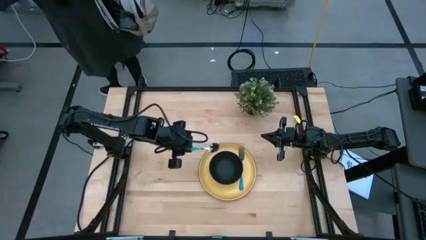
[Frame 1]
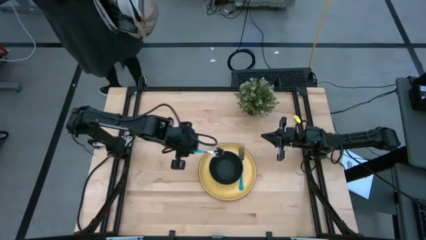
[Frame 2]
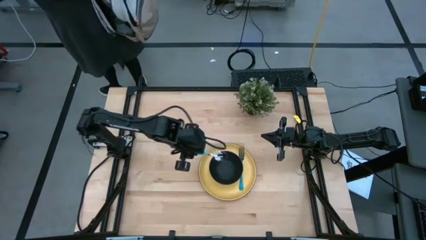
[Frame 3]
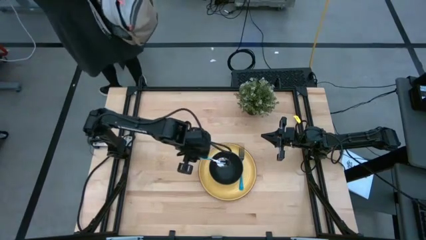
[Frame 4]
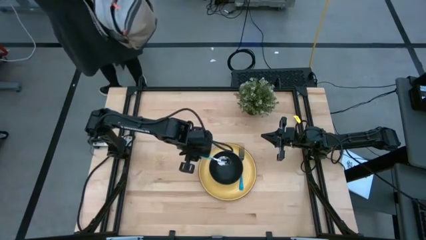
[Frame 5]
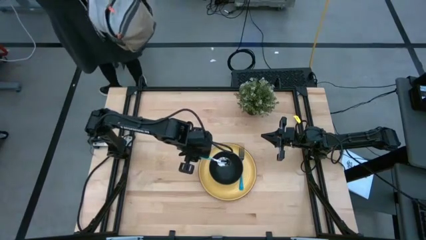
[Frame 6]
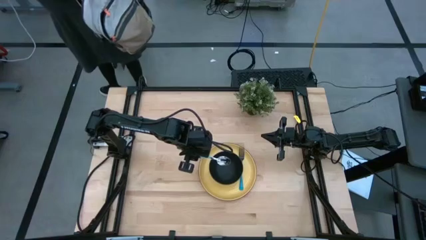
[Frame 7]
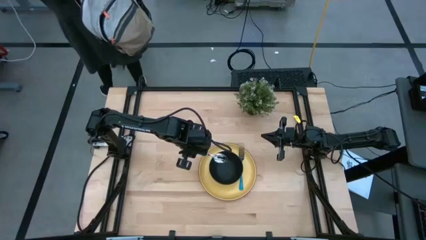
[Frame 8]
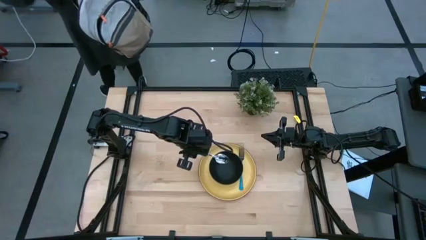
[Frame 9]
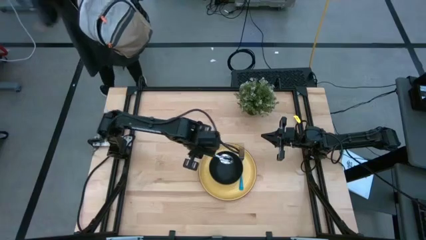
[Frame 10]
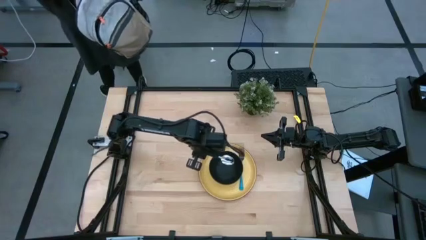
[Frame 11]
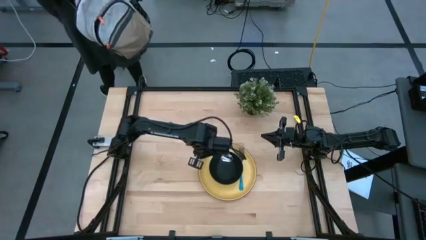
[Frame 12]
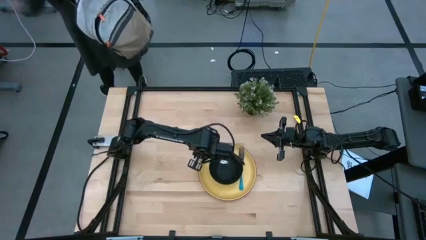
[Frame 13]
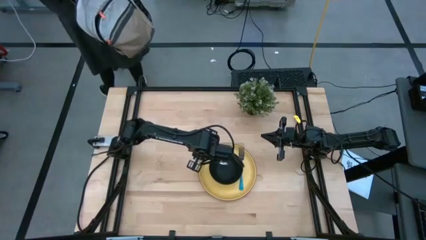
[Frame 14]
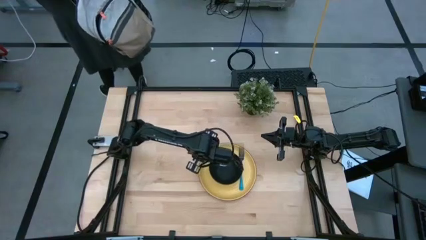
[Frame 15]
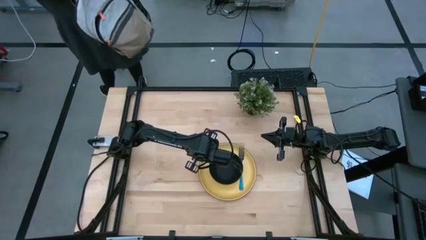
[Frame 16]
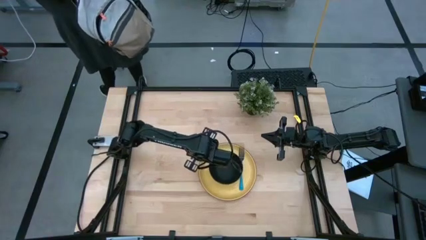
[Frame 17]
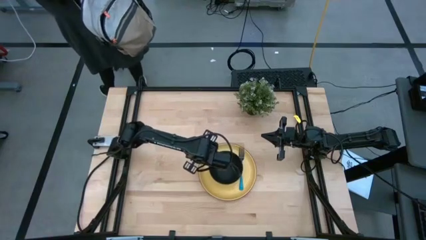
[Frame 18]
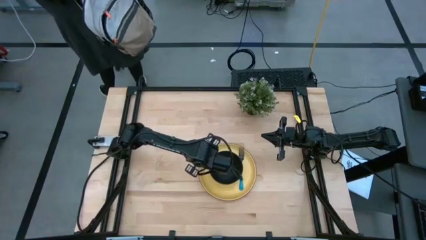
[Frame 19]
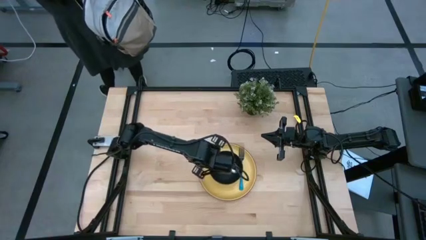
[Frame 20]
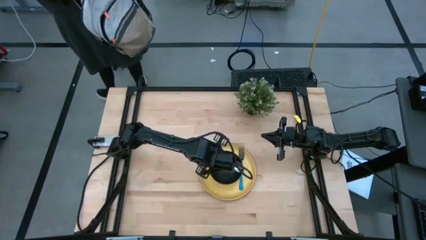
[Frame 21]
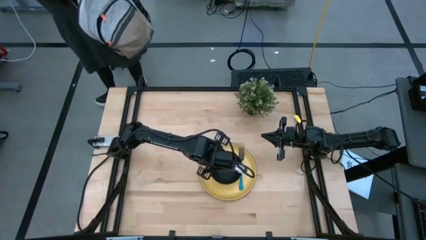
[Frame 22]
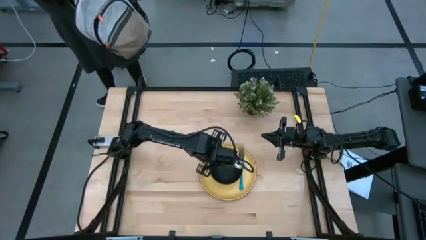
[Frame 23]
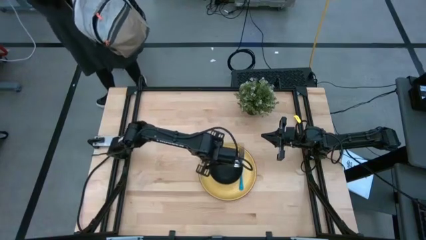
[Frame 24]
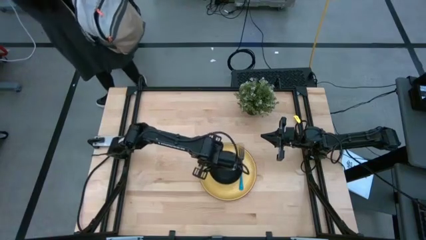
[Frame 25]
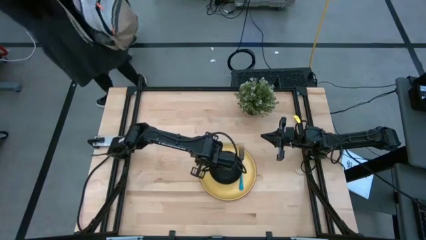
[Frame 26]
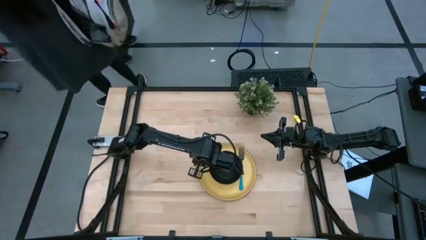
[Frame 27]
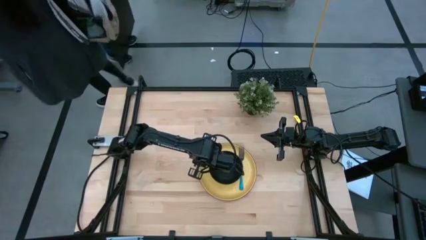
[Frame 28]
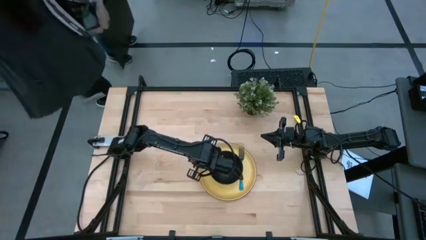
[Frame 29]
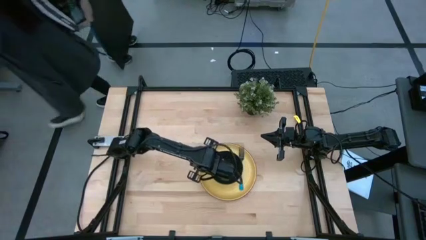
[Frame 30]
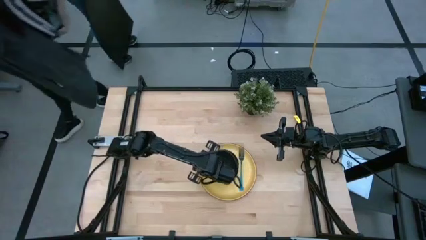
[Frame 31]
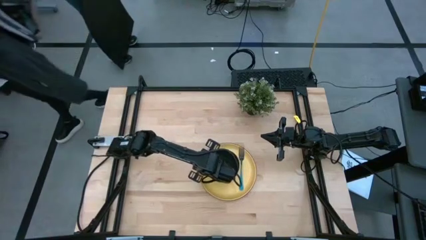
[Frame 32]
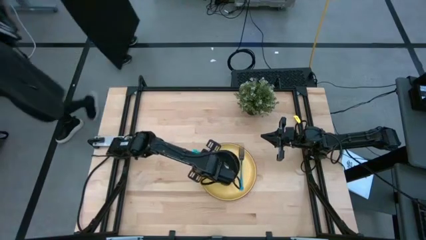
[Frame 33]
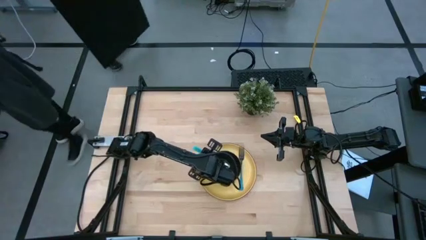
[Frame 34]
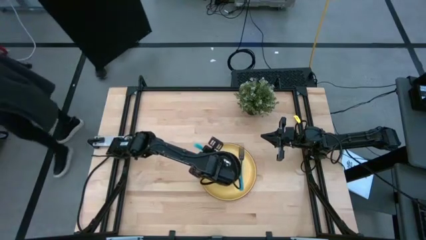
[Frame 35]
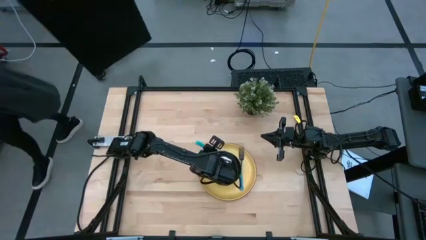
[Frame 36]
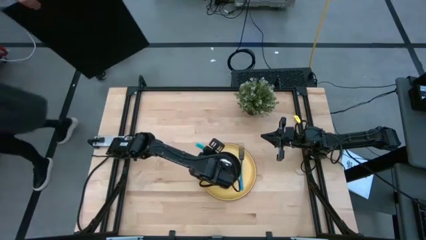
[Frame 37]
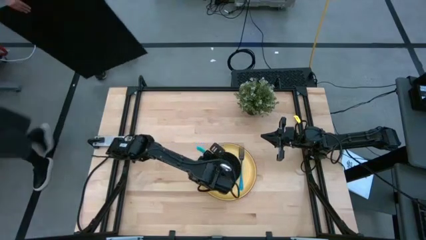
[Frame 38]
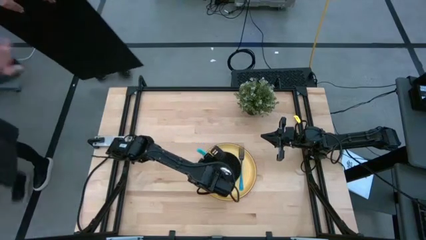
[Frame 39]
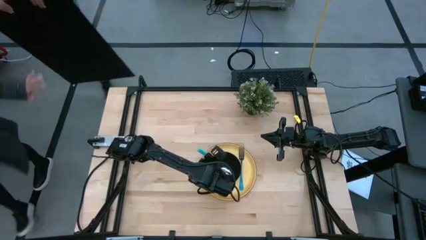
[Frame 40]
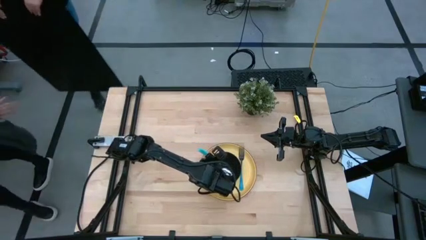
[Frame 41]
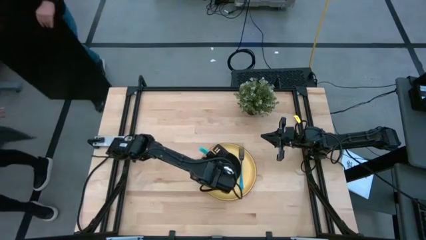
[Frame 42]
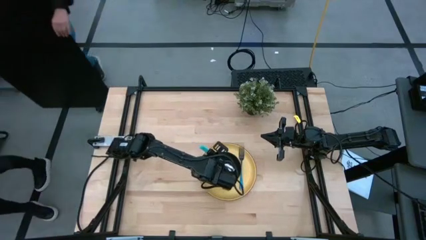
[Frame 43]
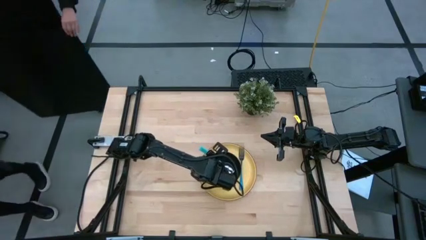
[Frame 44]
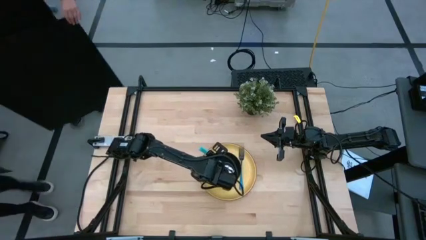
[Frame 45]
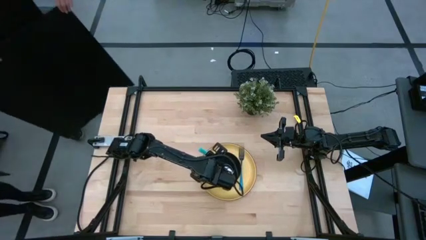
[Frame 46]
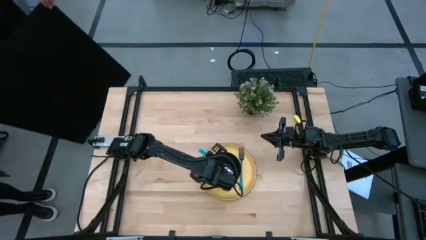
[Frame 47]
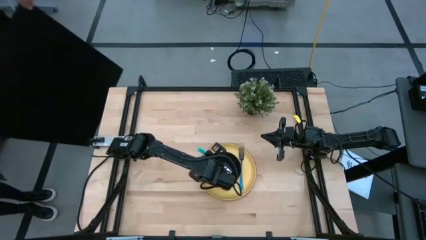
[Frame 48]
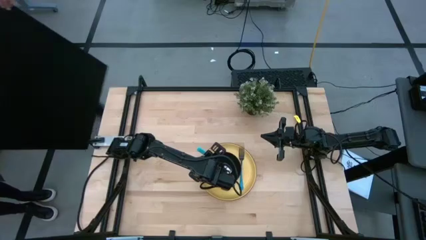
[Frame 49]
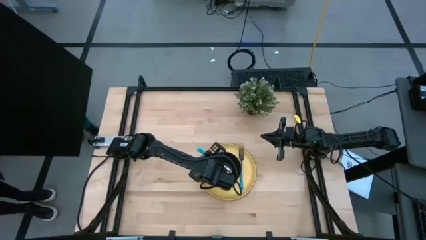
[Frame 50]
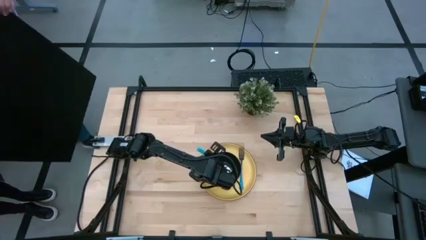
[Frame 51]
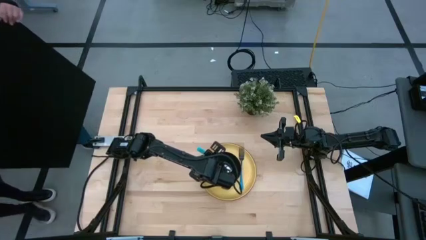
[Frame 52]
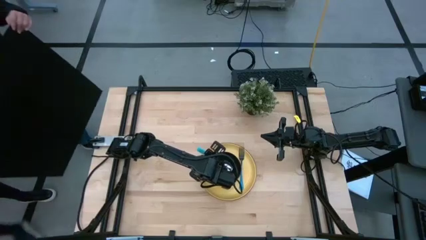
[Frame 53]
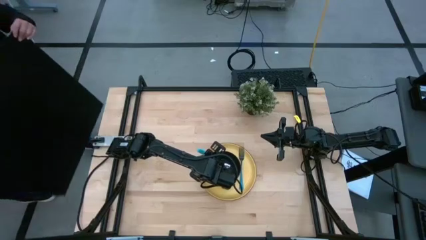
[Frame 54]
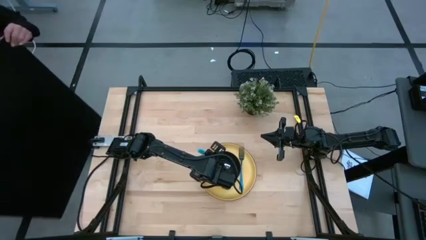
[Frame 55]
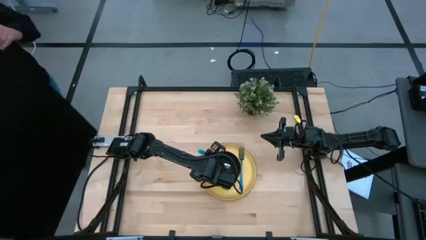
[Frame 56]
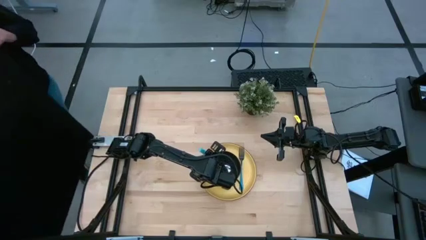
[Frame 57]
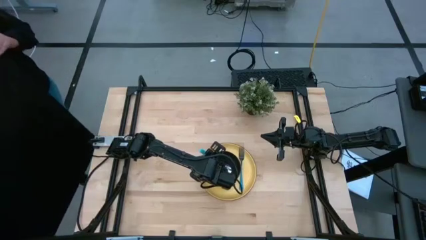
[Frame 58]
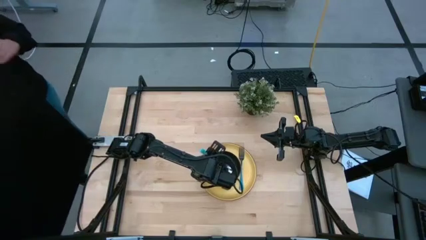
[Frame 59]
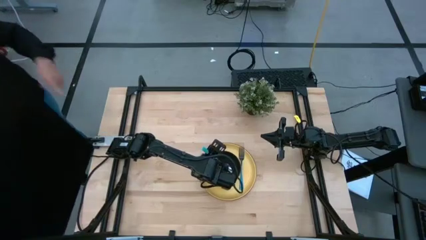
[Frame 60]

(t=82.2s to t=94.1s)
Task: Set table place
Put the blue spoon into the black bowl
